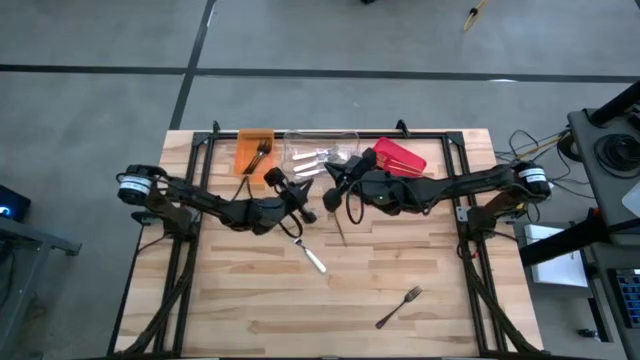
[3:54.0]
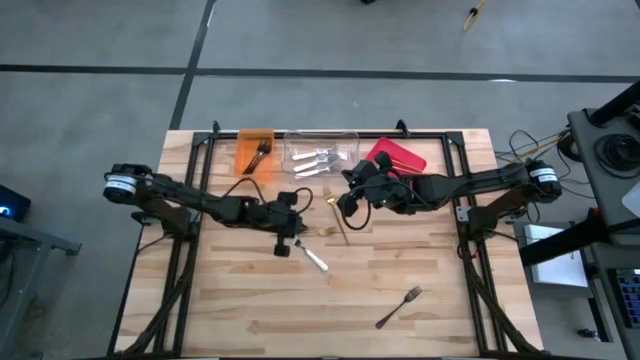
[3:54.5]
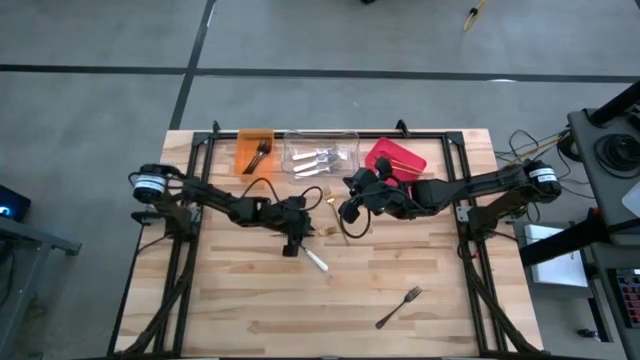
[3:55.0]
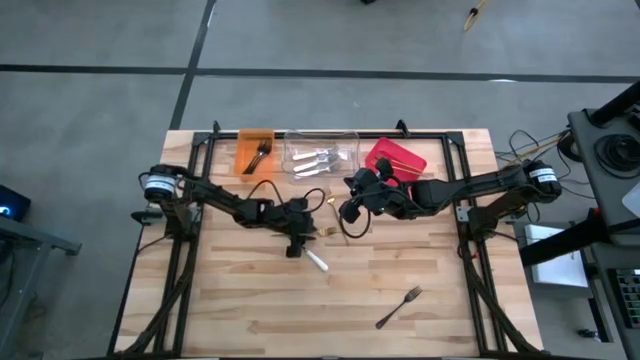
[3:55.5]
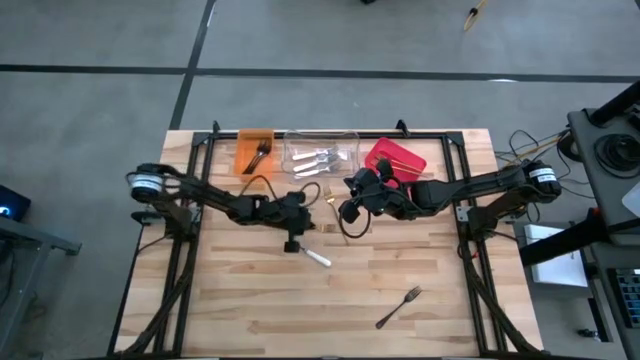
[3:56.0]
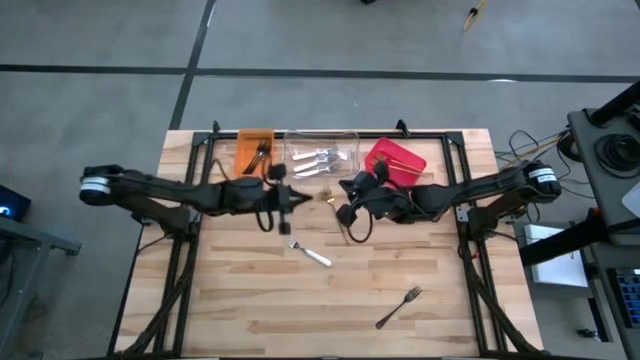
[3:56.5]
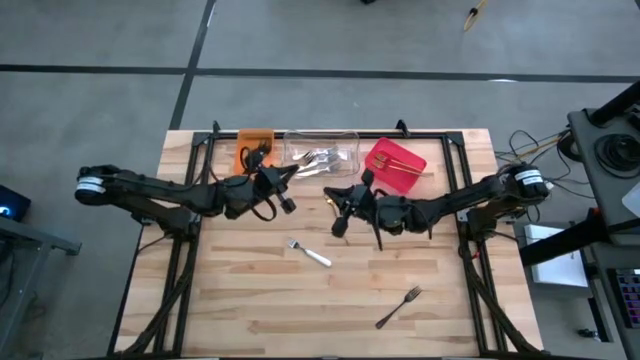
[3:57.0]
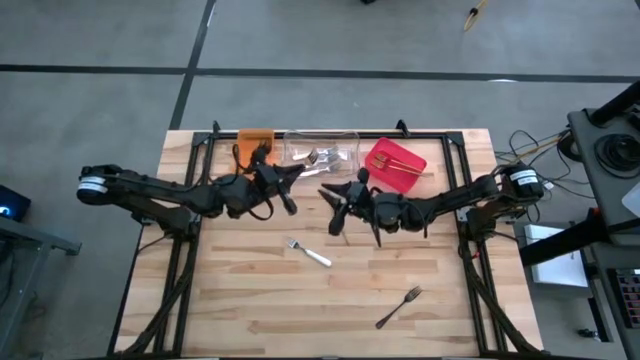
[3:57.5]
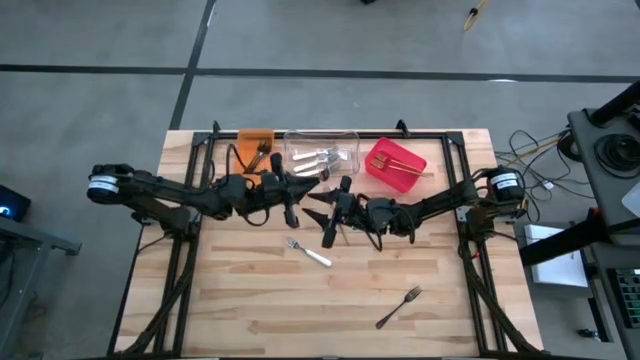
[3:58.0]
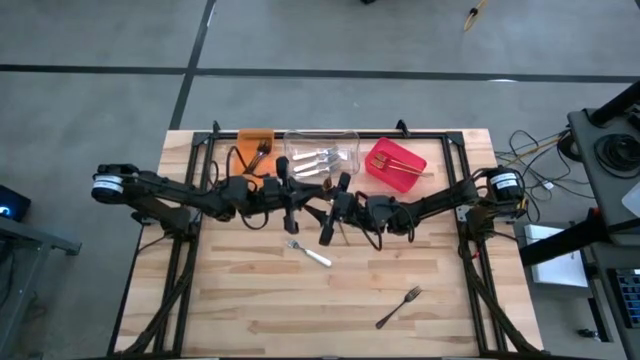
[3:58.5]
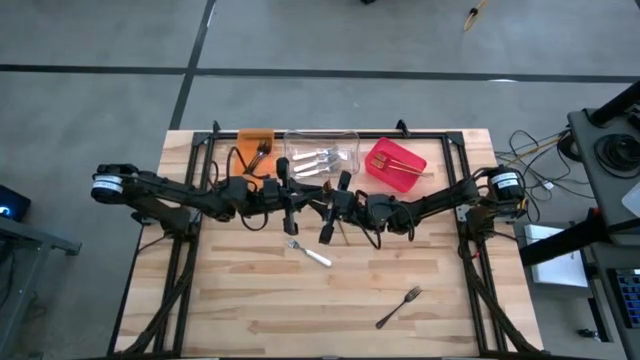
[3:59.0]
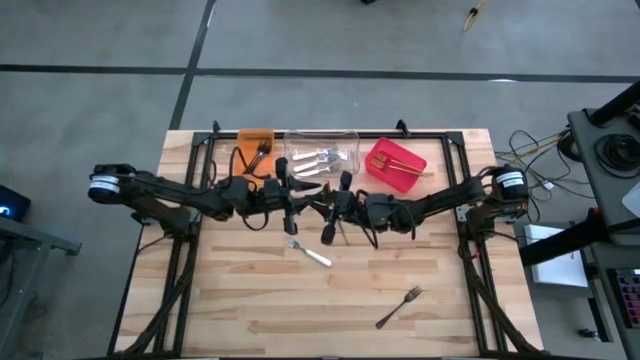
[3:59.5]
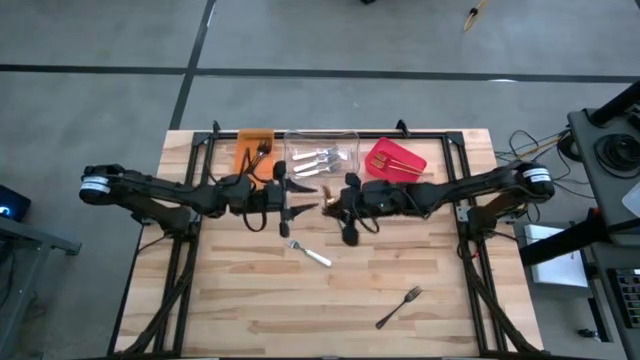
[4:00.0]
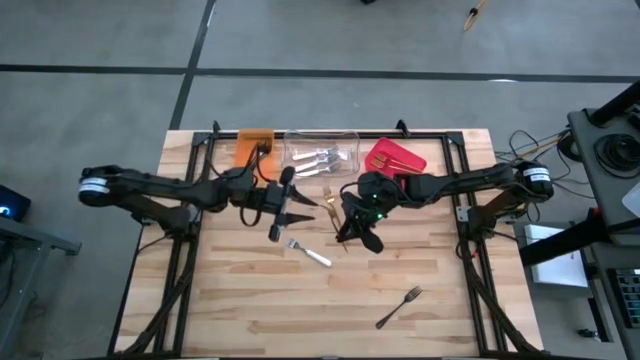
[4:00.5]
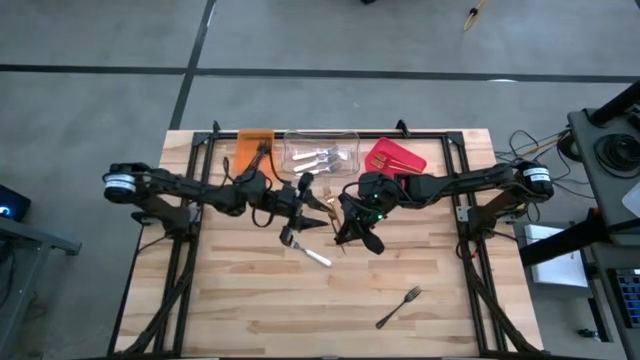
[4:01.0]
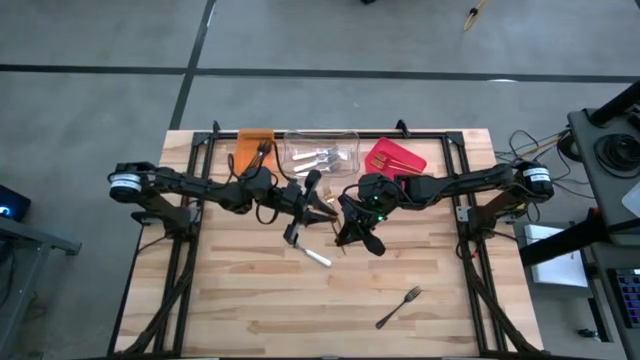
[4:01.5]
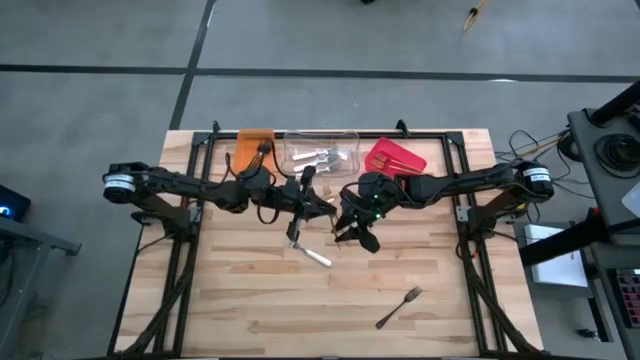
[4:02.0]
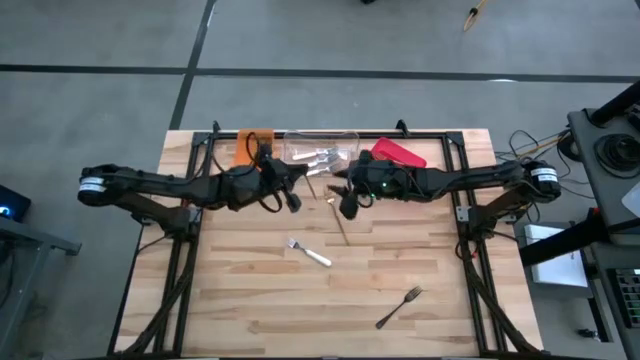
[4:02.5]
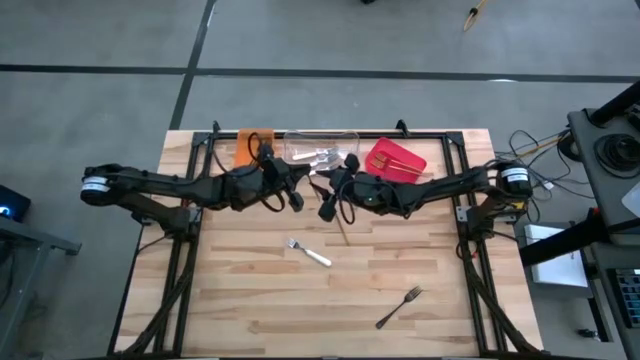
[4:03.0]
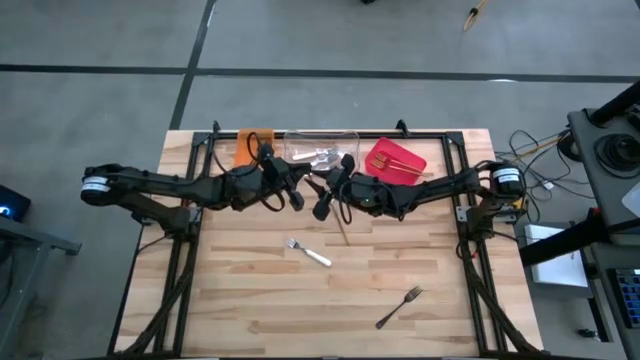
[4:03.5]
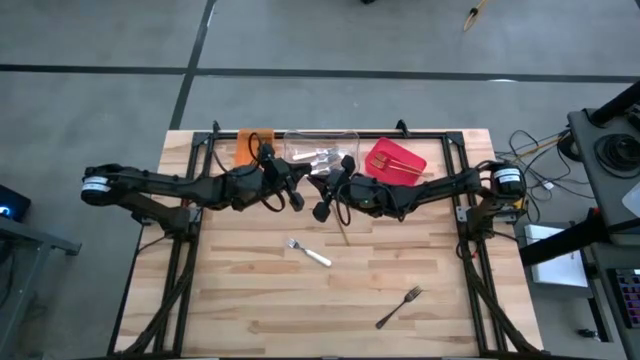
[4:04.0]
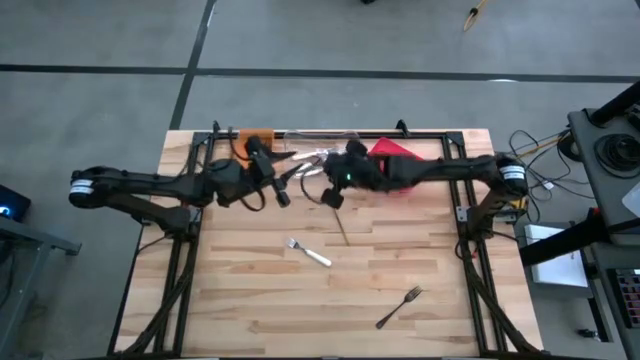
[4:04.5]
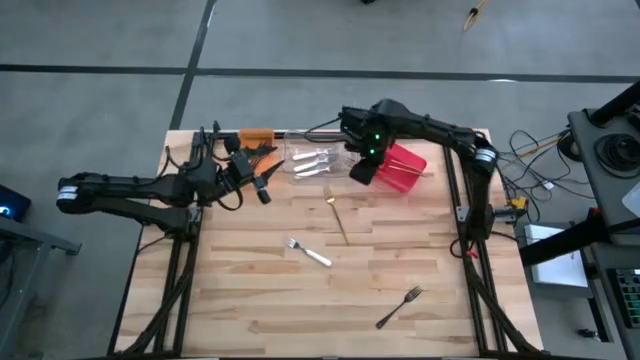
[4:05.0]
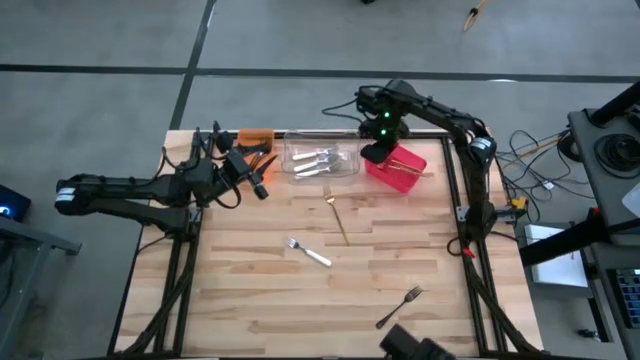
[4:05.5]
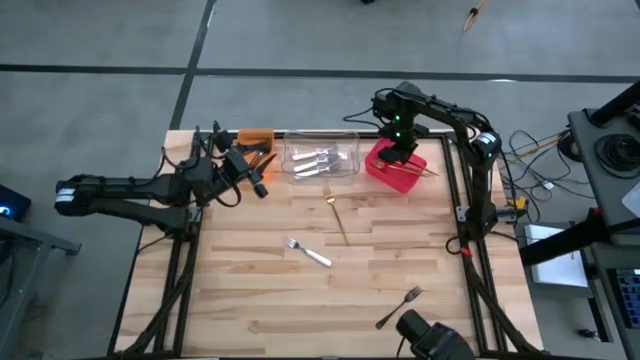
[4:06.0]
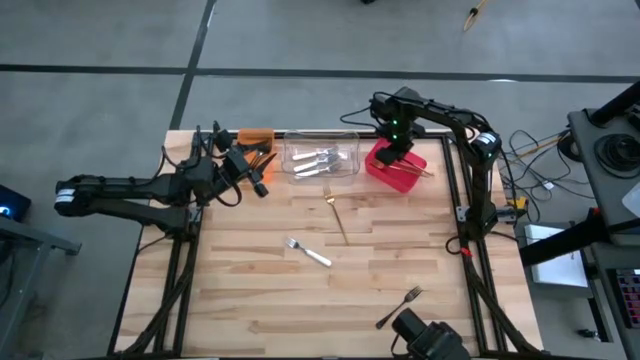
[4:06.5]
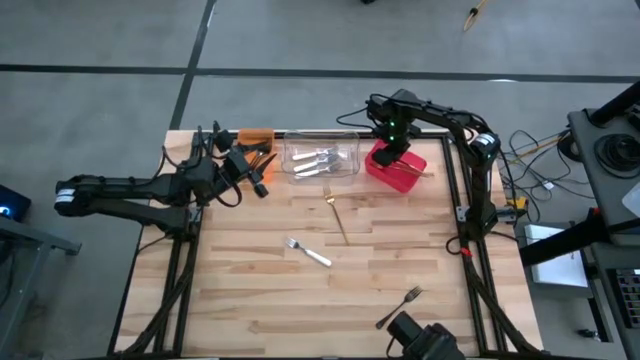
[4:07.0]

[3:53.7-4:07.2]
Task: Sort silverware by color (type)
Put the gold fork into the red bin

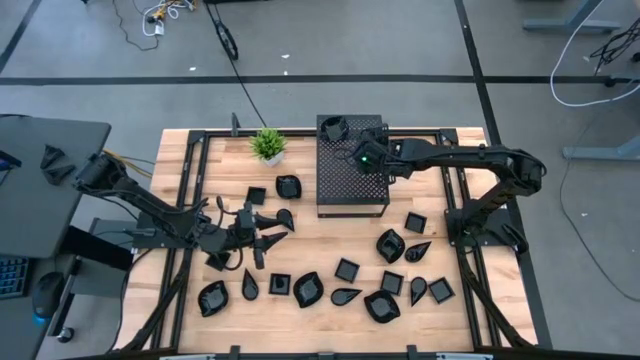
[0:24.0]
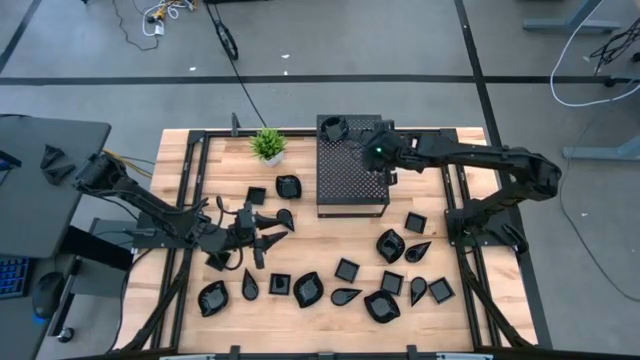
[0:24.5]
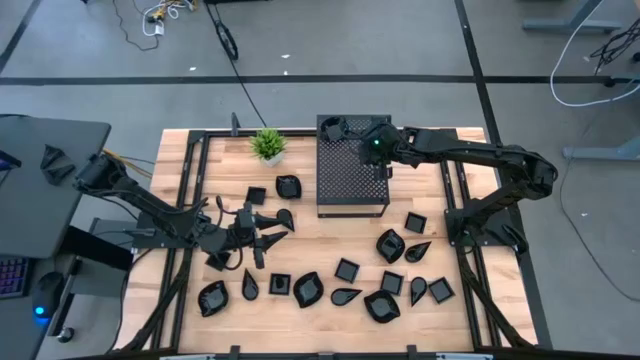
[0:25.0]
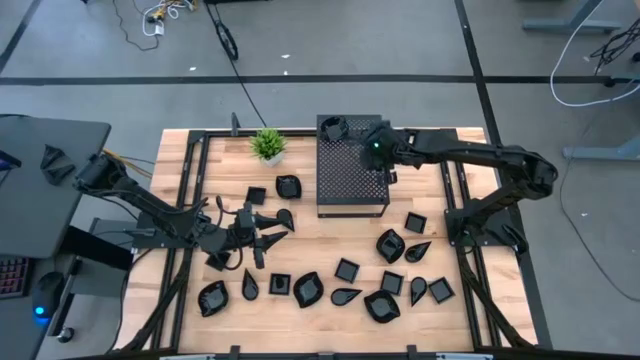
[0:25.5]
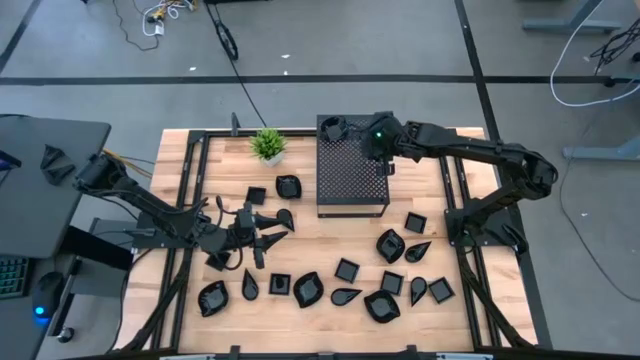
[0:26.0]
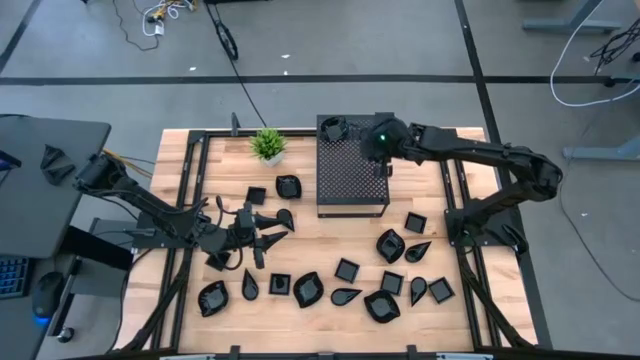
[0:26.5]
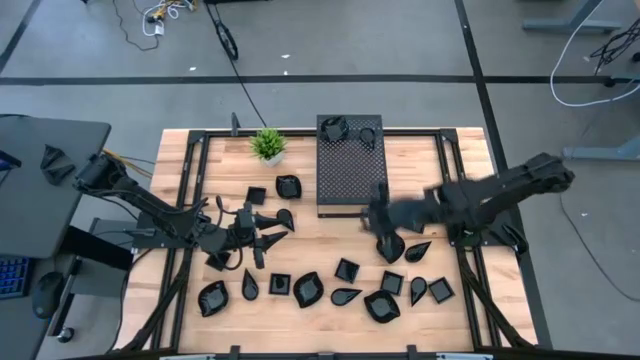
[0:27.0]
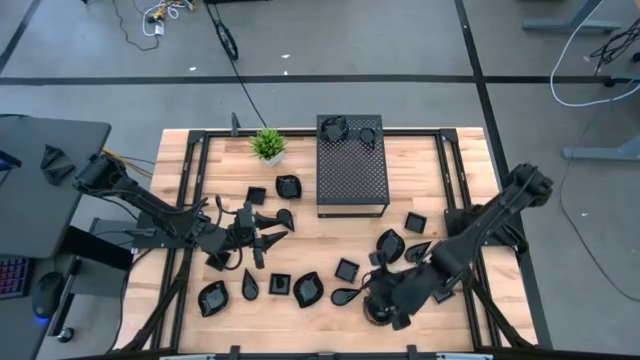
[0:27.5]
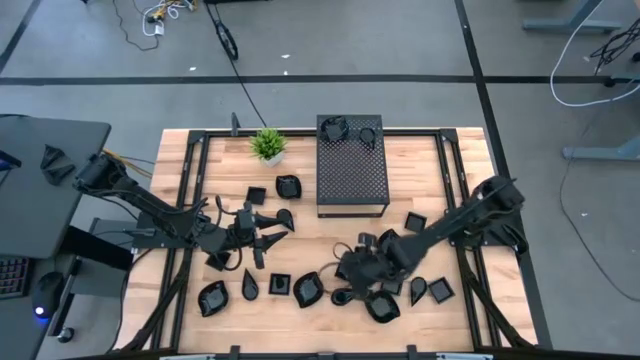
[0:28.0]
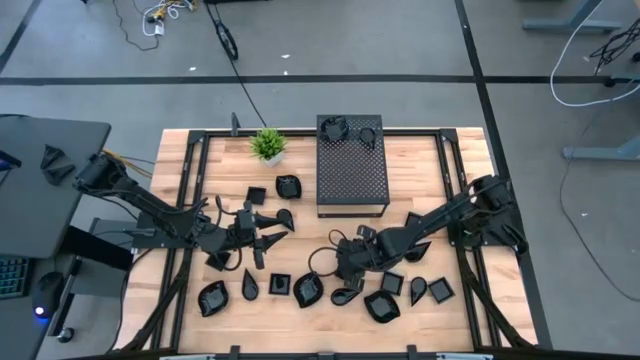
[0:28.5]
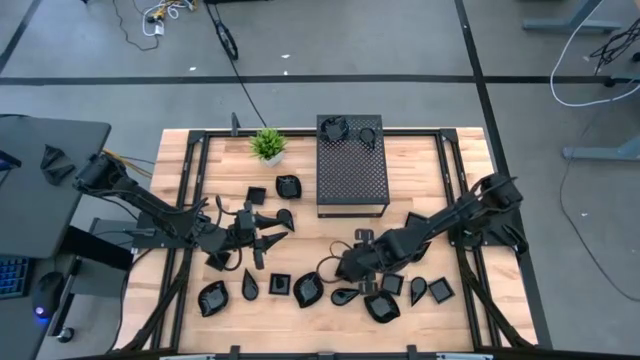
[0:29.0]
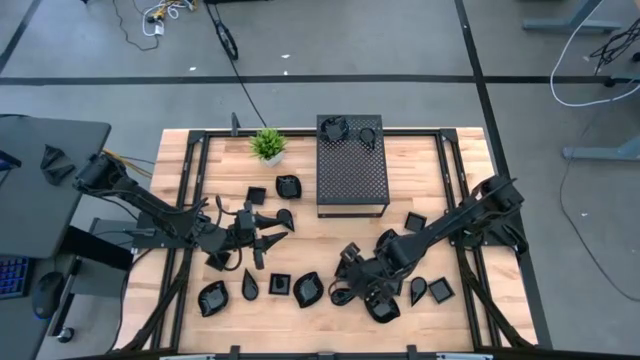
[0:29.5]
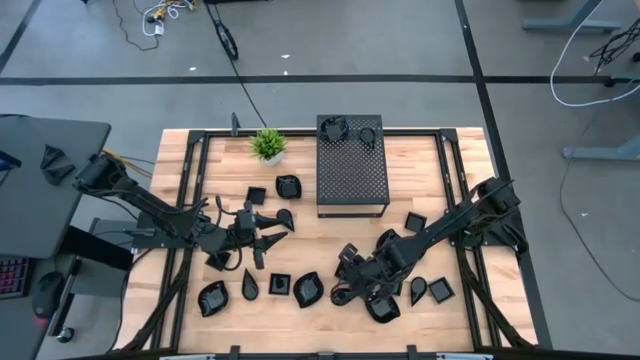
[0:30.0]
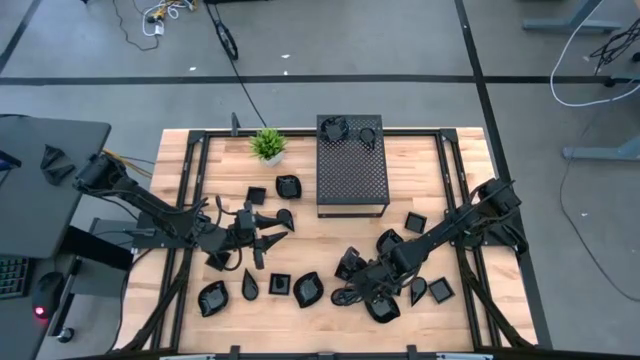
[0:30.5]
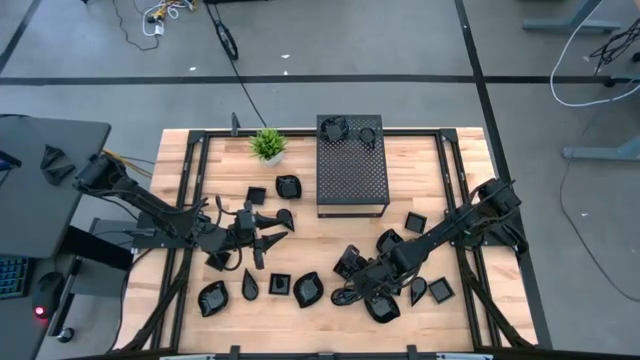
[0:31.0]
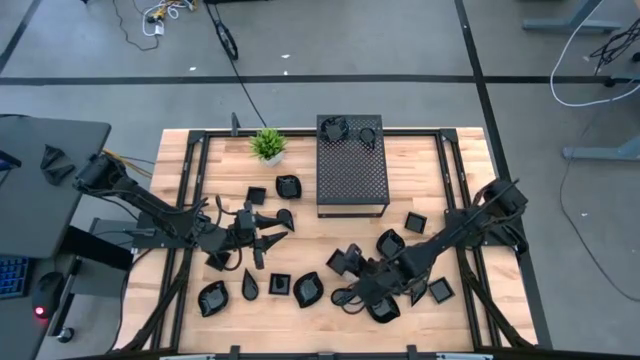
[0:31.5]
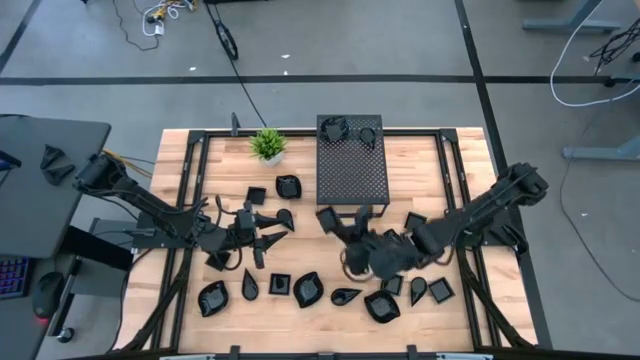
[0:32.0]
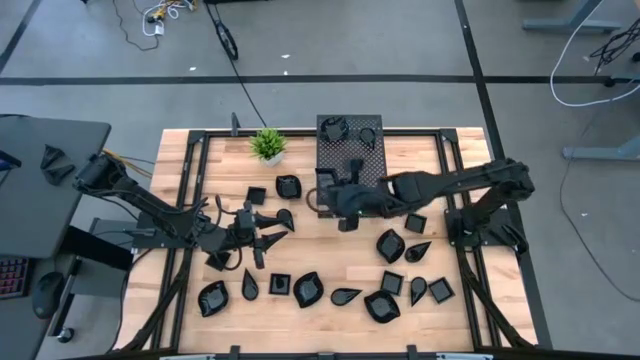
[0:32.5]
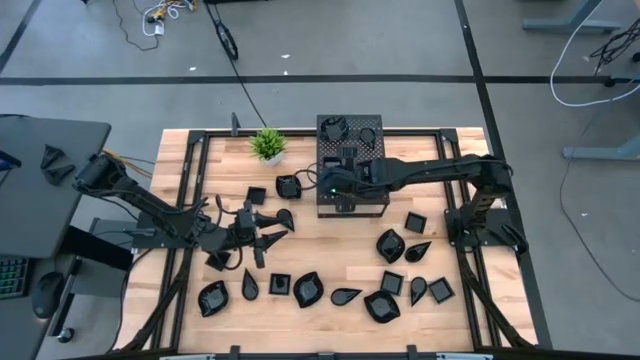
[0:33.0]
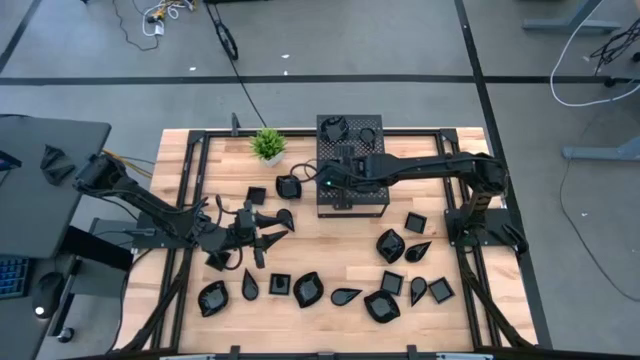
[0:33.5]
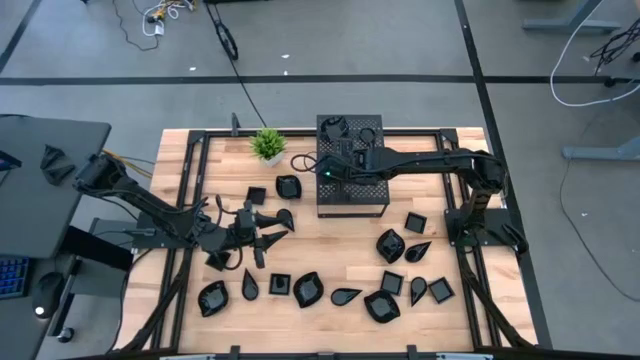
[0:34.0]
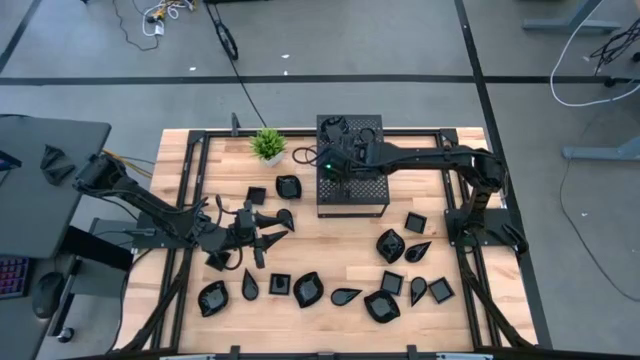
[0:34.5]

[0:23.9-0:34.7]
Task: Pick & Place Mini shaped plates
Put the square plate on the shelf
